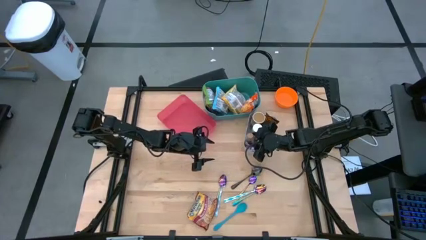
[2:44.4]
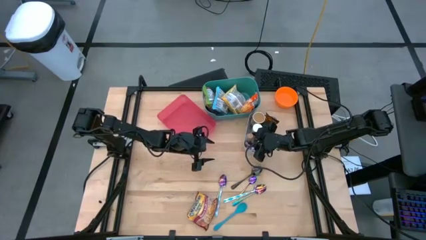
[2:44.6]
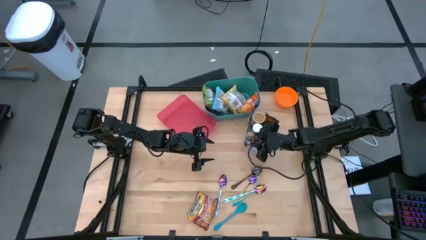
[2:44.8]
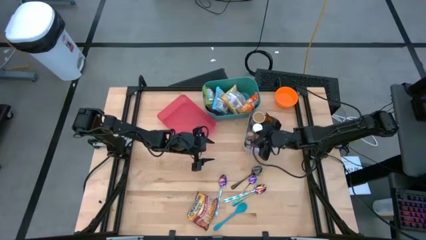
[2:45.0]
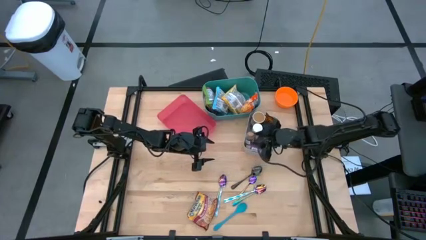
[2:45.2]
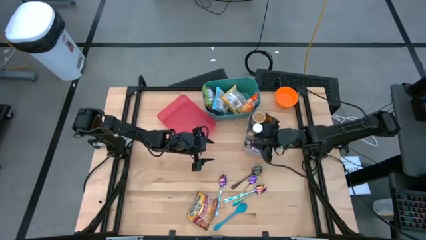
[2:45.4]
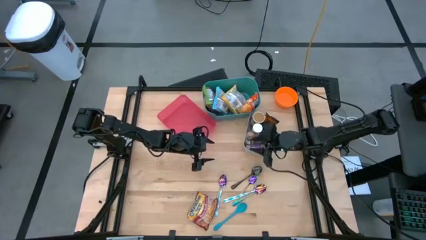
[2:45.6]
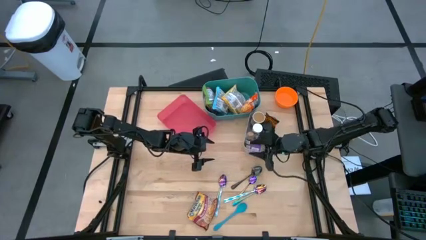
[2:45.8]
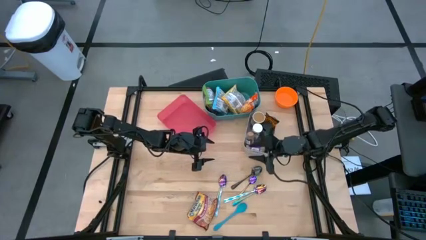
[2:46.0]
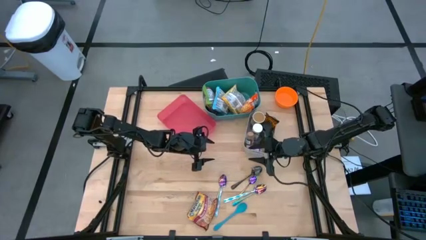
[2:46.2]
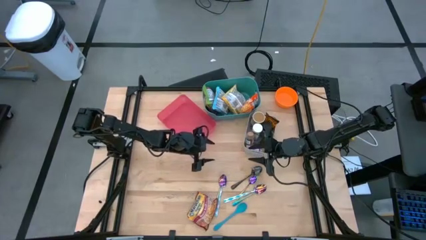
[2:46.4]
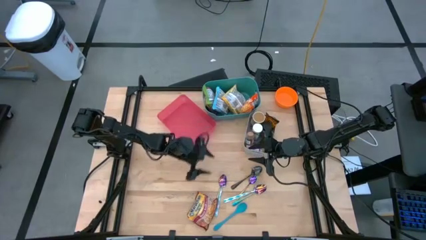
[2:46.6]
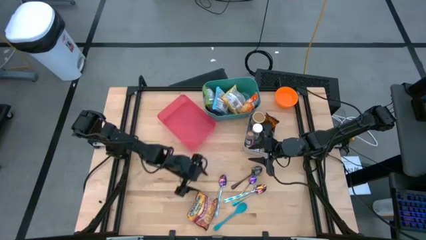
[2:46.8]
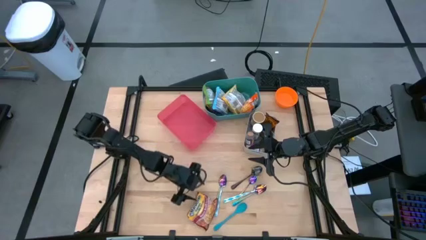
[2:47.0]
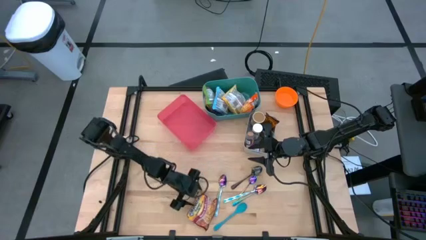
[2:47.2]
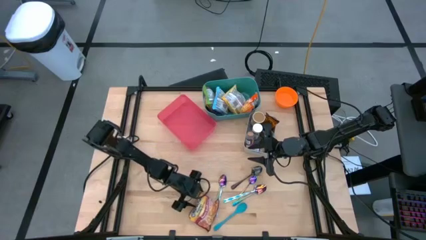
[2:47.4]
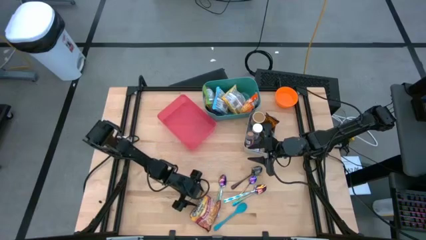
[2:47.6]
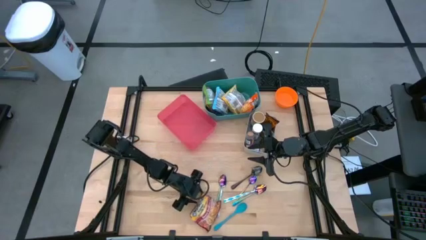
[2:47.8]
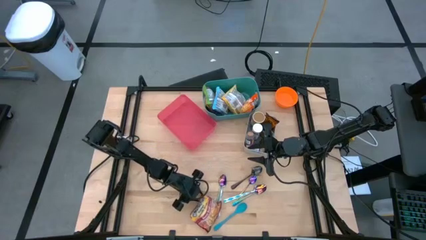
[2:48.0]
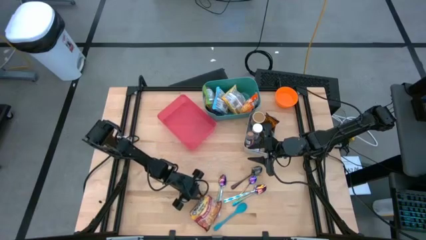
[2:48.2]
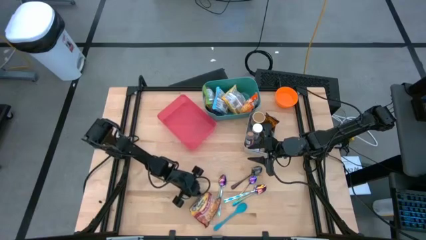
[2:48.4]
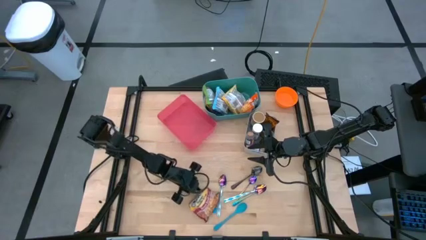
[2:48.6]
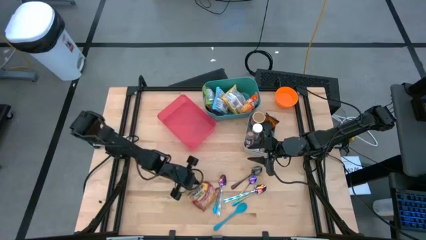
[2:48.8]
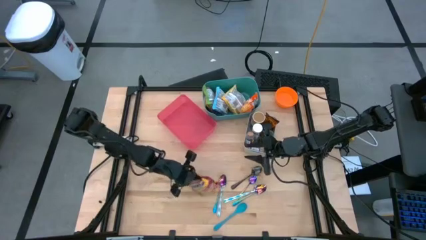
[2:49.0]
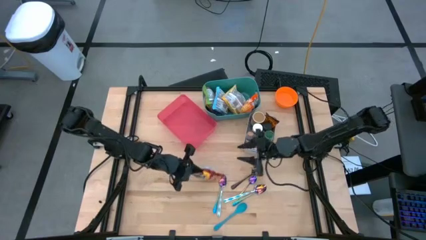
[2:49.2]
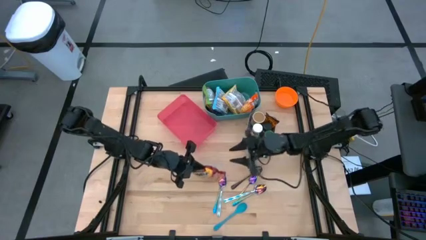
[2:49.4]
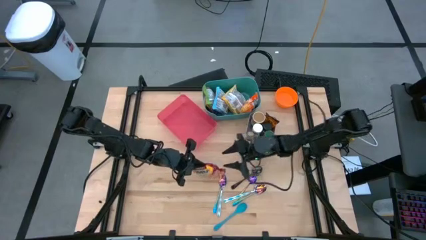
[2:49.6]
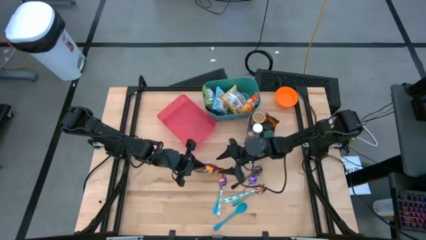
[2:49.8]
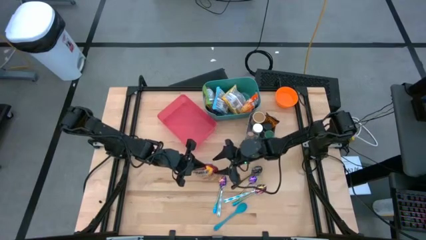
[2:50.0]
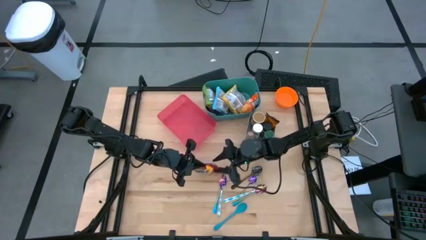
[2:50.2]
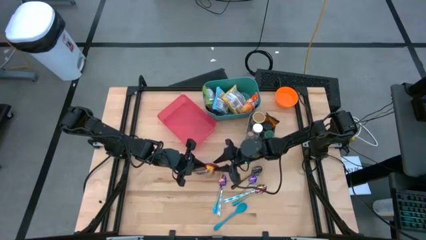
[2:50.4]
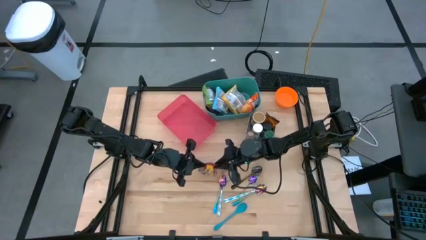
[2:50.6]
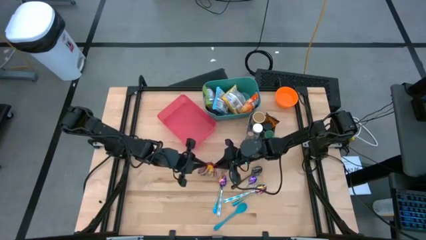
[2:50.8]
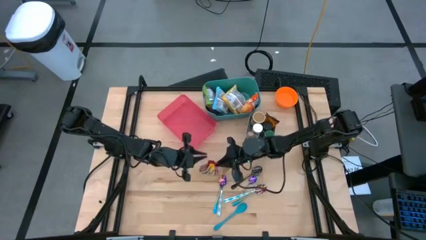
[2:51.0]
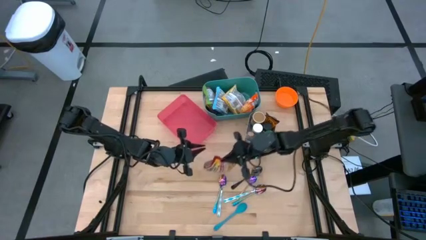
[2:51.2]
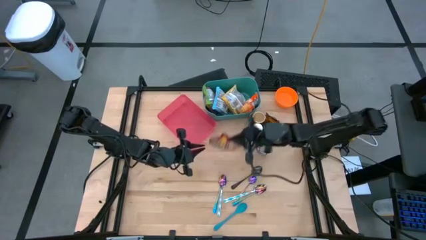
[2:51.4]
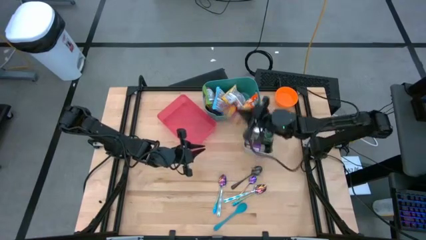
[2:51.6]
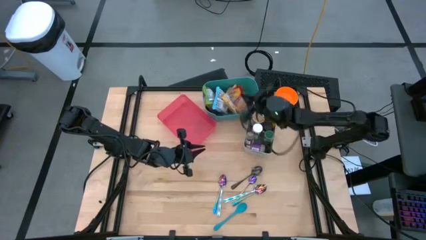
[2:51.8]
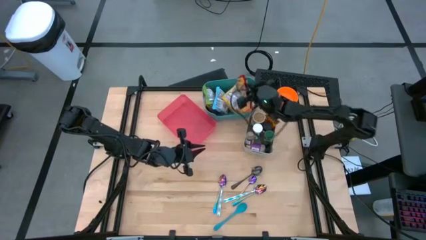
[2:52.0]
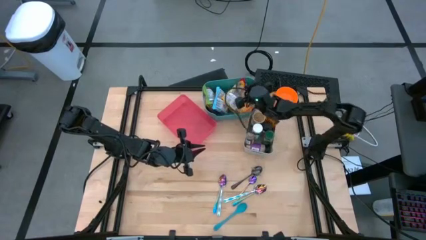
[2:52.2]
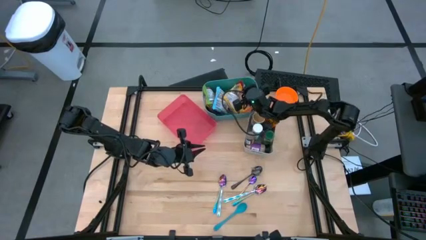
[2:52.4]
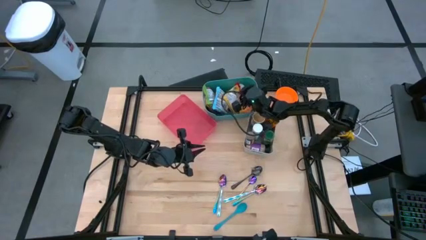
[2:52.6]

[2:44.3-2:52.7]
Task: Pick & Place Food Item
Put the red noodle pack into the green bin

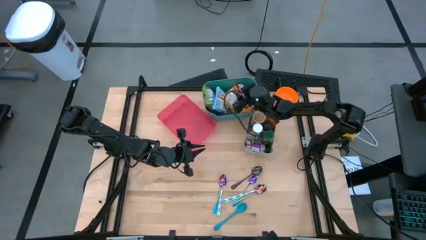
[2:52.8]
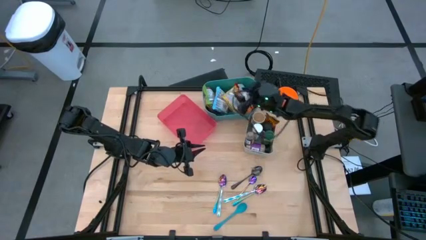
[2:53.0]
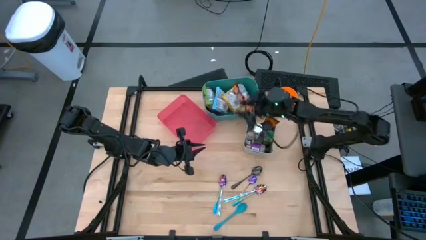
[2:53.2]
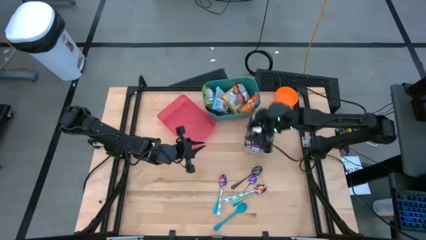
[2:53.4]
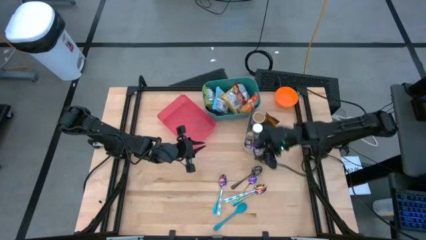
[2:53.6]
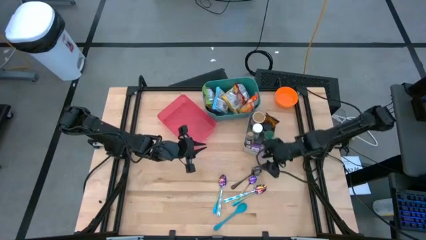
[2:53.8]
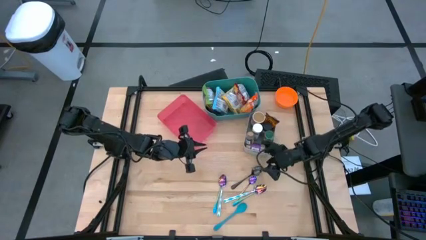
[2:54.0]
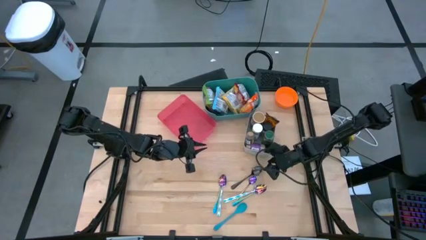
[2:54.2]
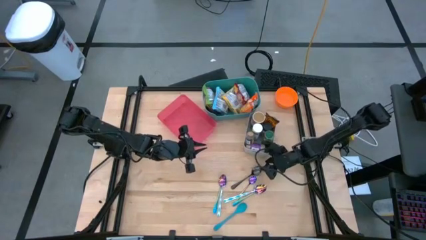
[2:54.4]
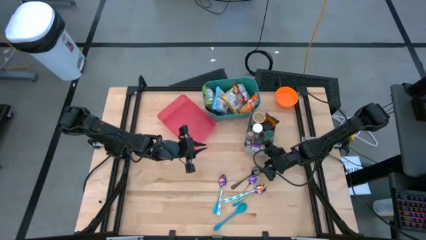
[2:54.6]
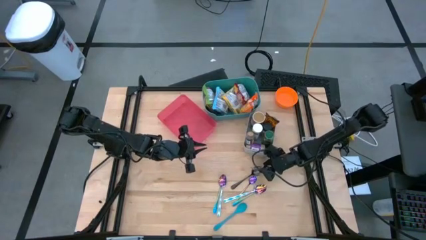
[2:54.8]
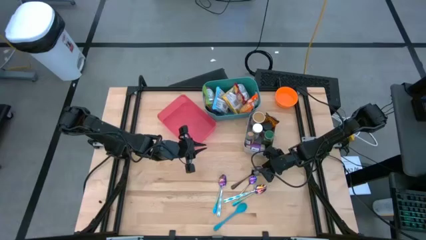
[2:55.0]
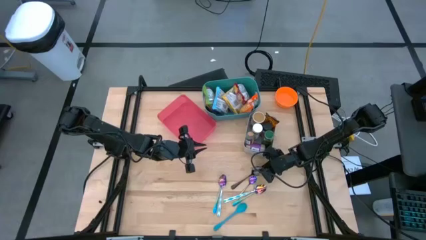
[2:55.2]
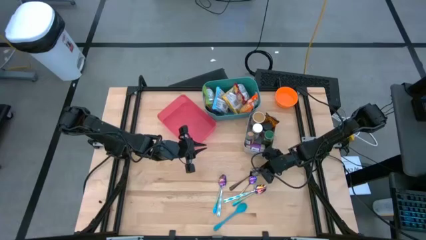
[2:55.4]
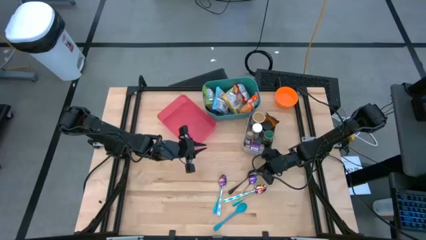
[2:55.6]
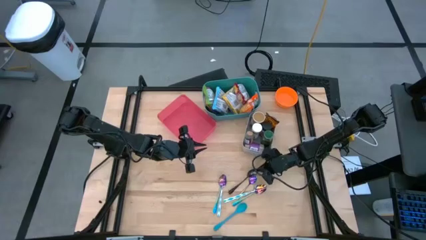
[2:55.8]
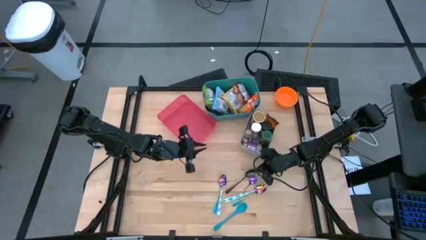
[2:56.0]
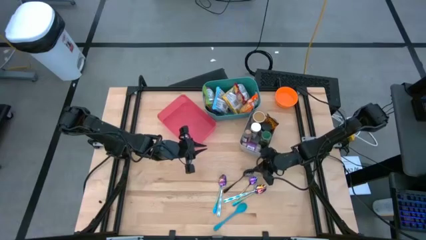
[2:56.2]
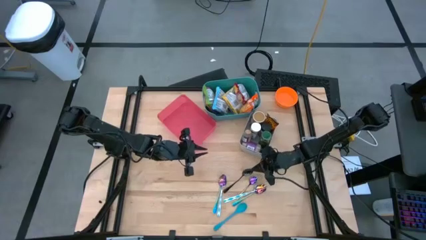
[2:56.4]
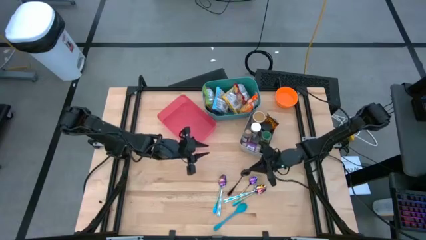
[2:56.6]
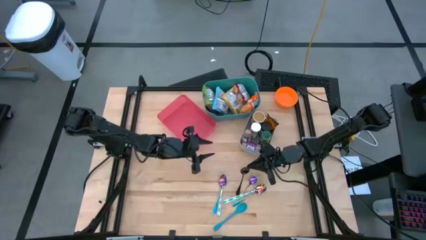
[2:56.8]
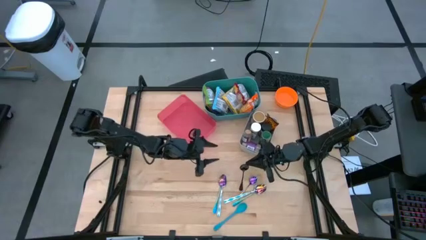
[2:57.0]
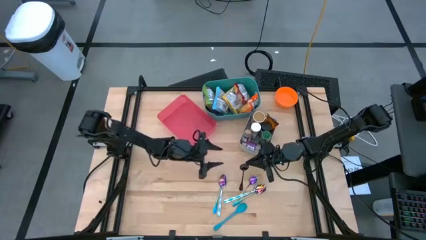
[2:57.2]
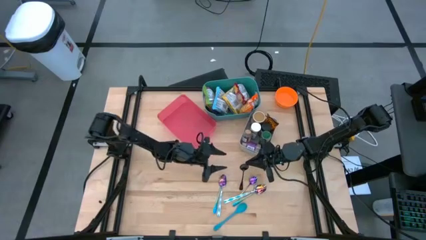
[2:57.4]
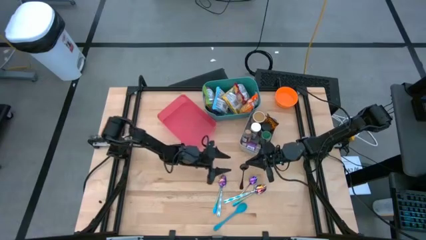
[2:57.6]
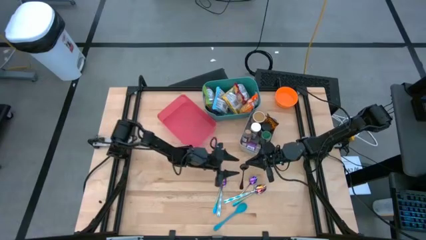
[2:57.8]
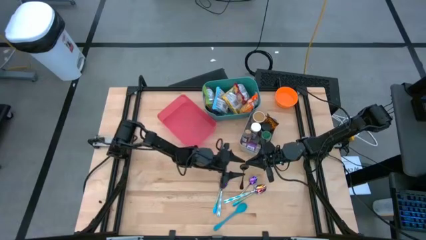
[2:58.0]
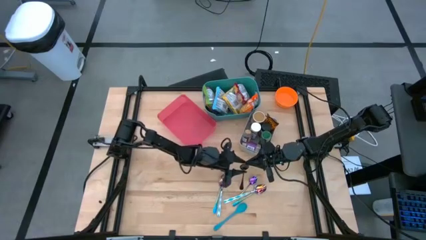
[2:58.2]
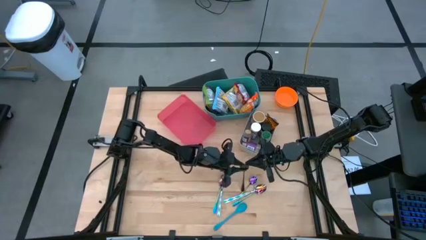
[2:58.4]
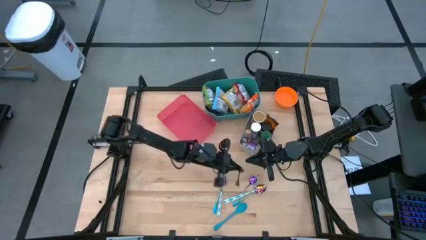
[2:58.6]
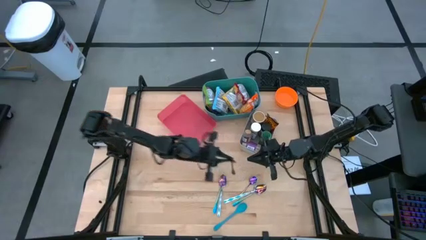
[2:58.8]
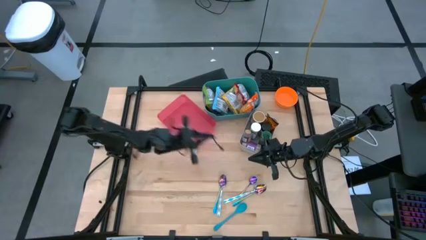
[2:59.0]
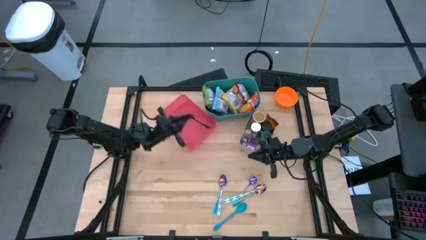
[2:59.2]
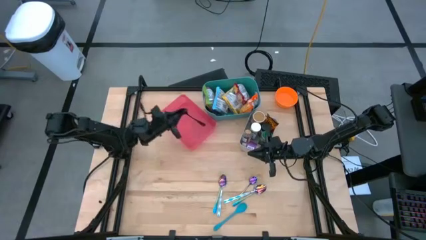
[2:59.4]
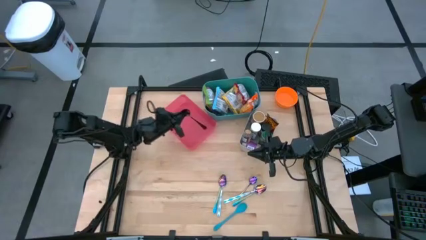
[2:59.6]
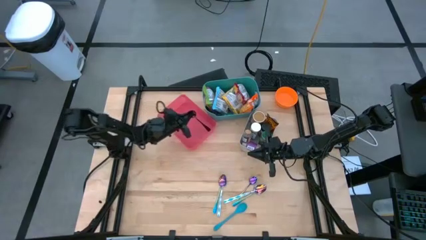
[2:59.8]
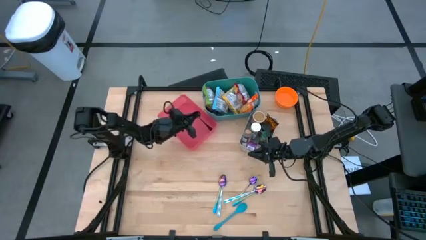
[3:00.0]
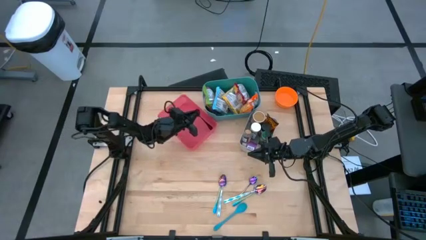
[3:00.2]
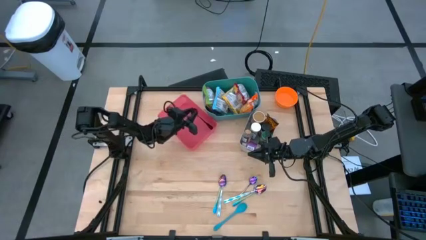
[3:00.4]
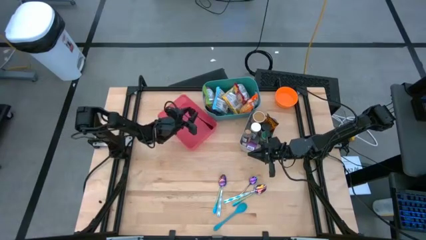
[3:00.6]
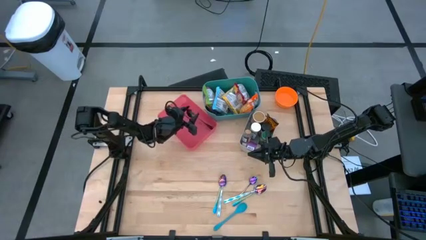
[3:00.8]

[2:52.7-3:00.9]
Put the black spoon into the red bin
